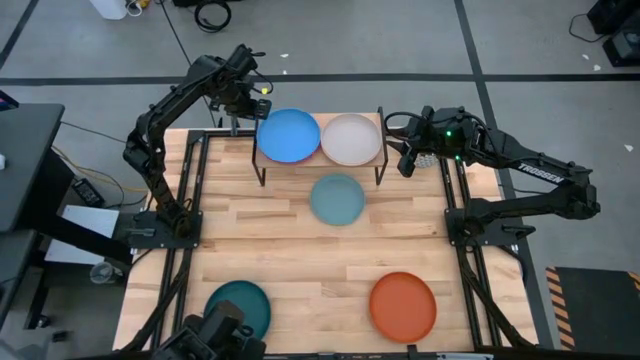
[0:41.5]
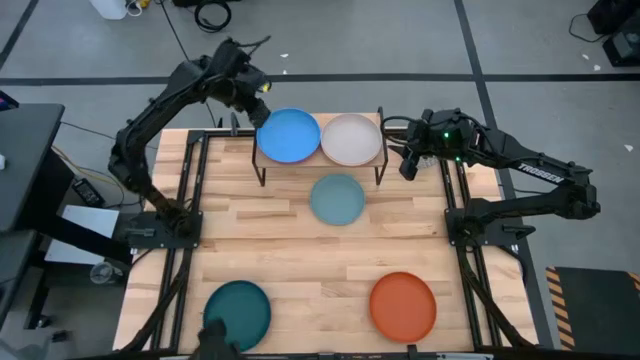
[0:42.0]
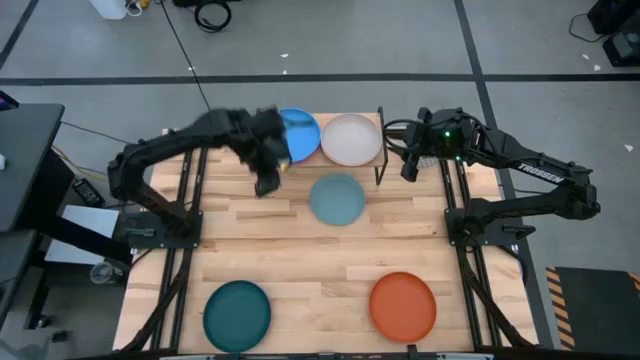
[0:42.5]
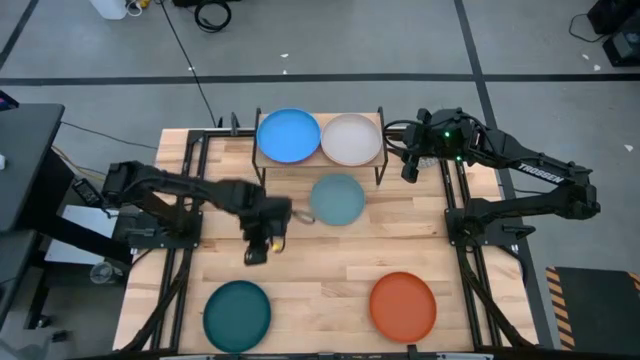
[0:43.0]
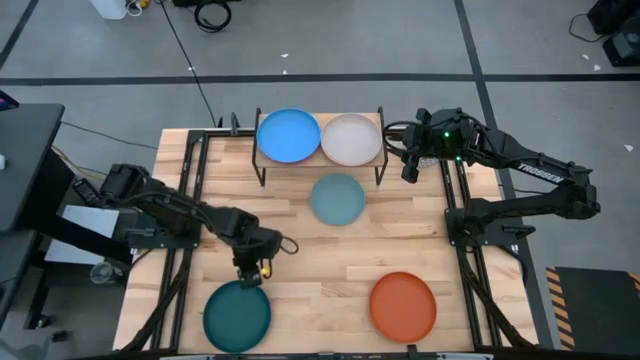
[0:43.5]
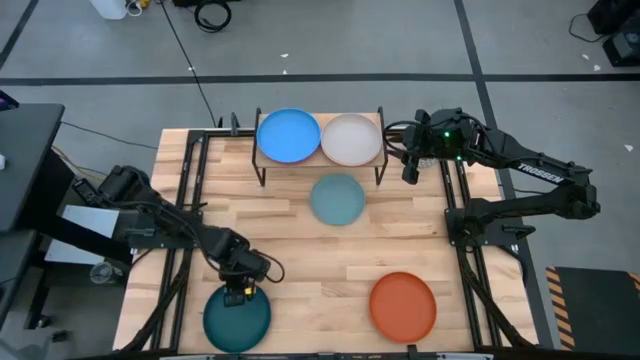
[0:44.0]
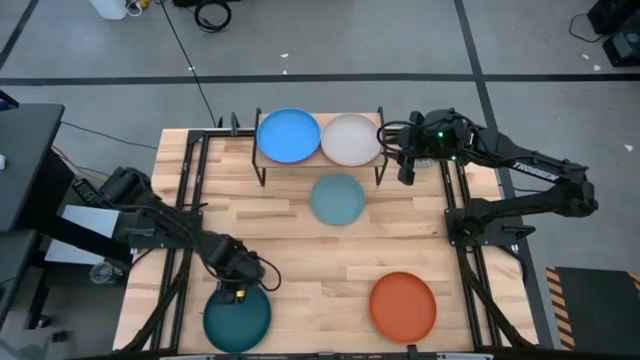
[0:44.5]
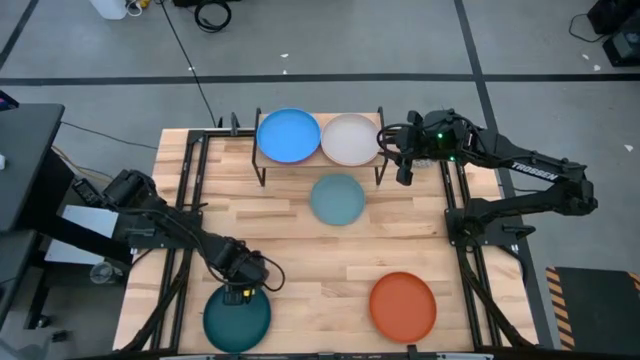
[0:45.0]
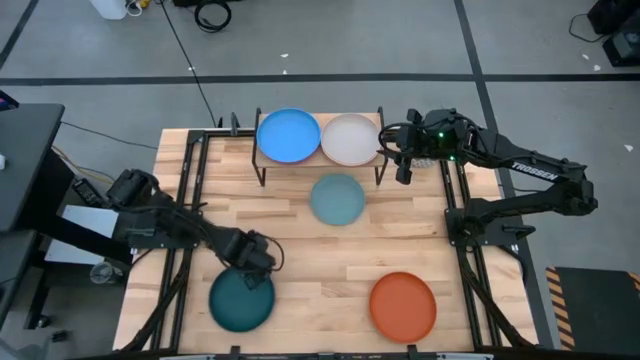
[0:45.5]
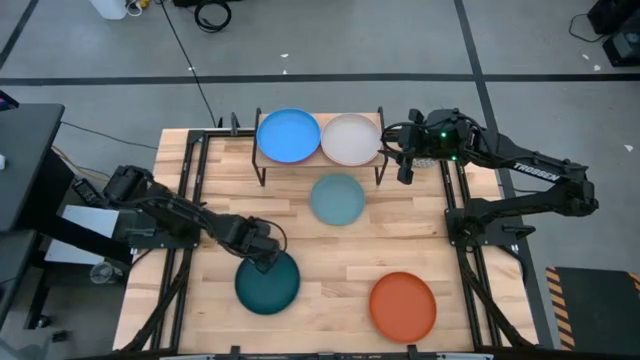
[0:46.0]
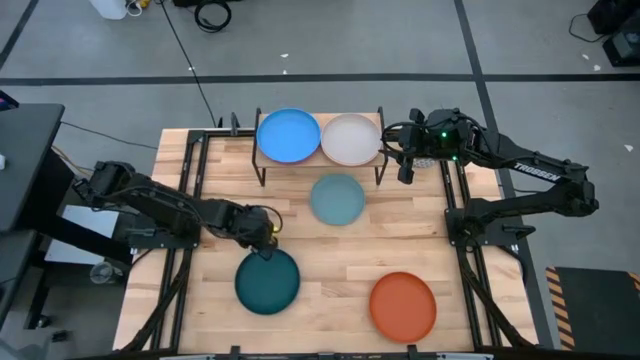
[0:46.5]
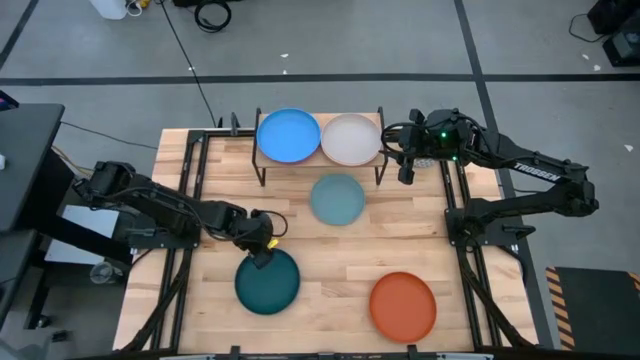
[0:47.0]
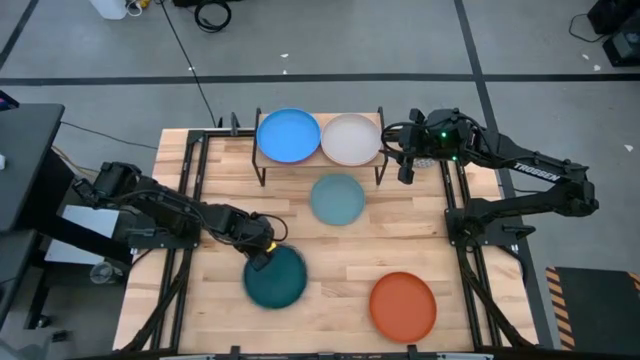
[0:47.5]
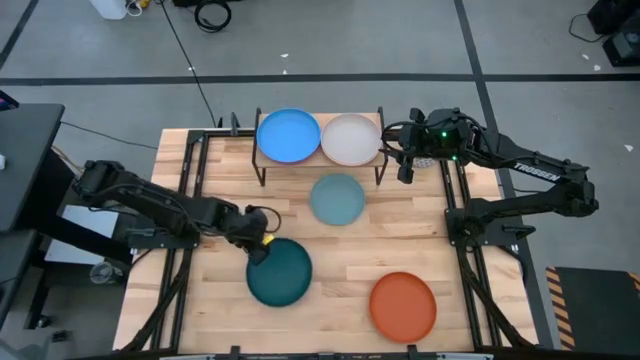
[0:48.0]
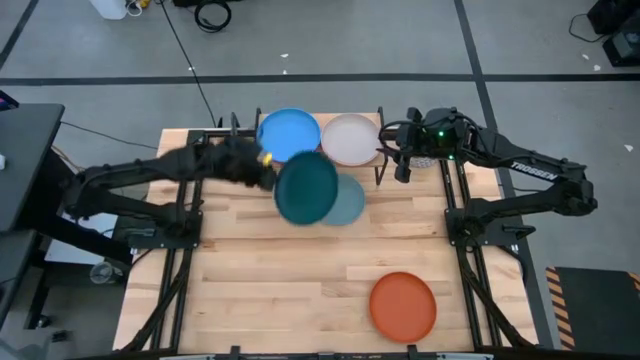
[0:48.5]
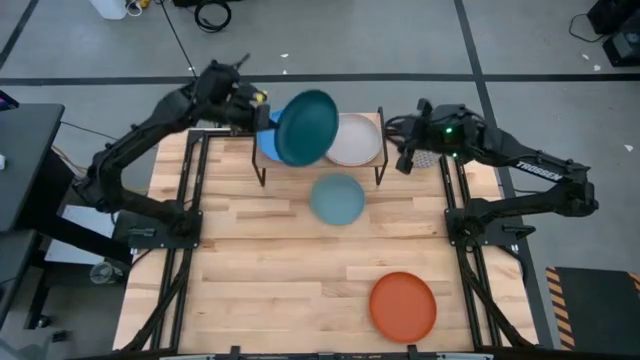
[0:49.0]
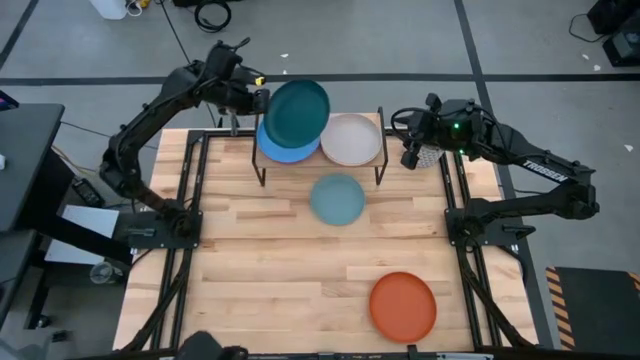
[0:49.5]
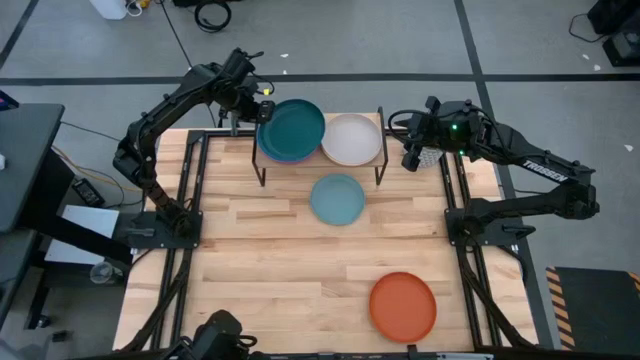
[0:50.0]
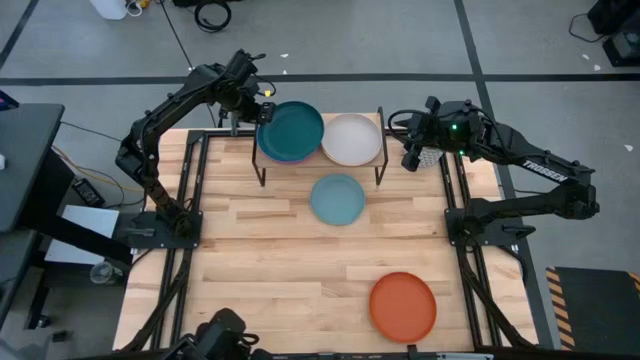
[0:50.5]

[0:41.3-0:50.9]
Task: Place and stack plates onto a shelf
Stack the dark blue plate on top of the blue plate on the shelf

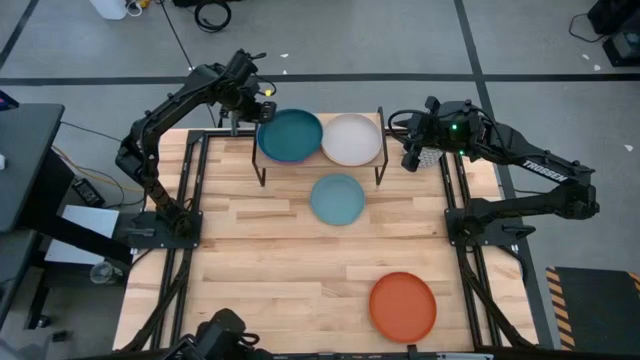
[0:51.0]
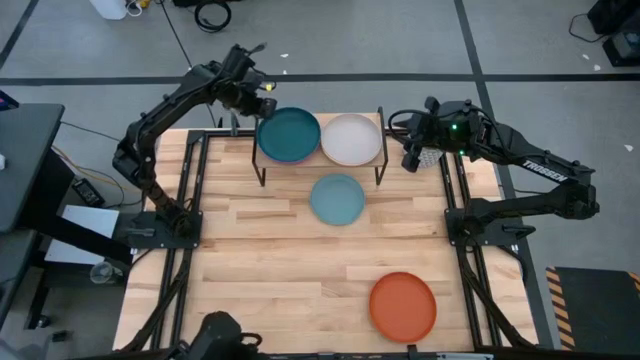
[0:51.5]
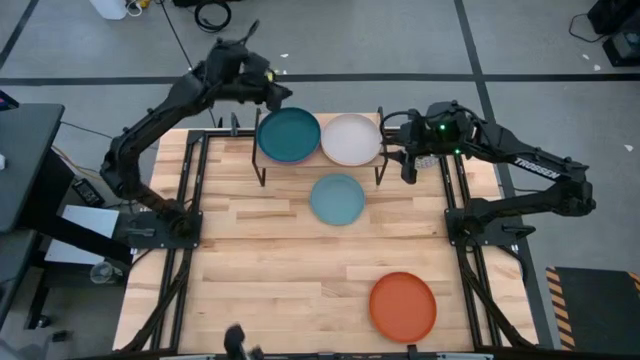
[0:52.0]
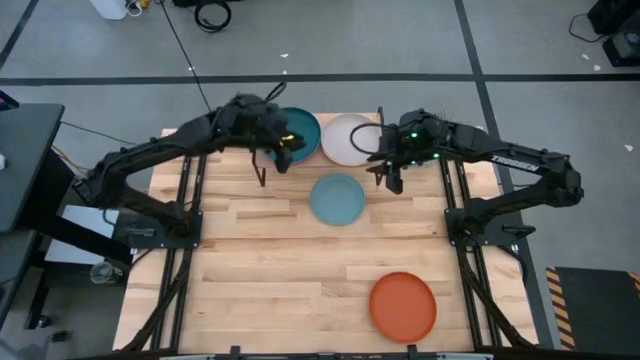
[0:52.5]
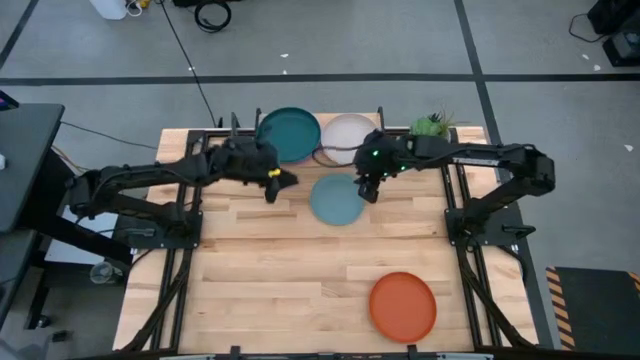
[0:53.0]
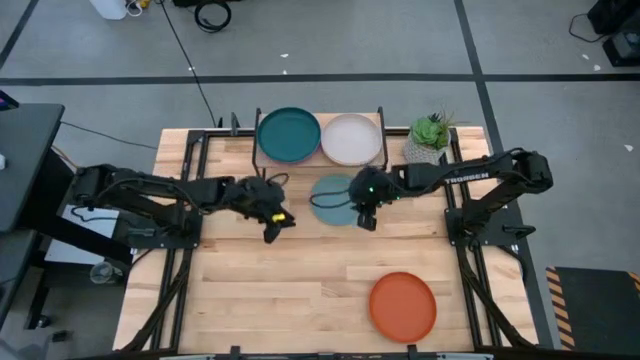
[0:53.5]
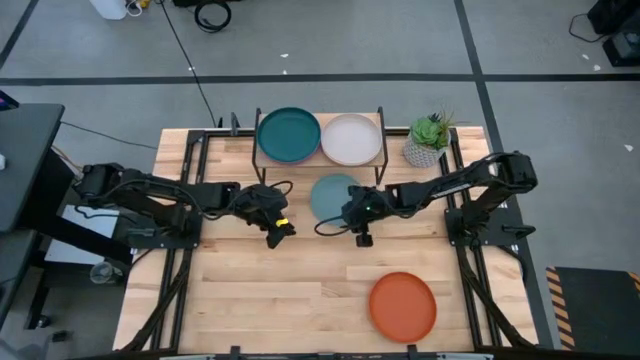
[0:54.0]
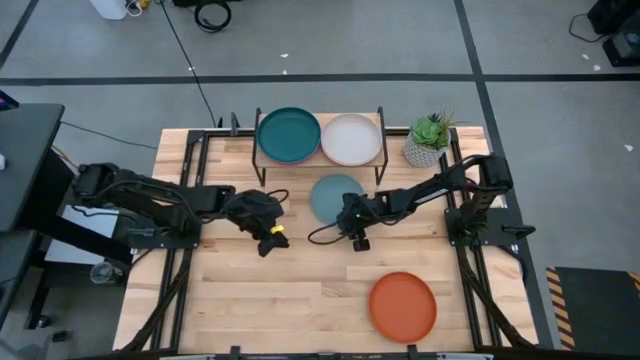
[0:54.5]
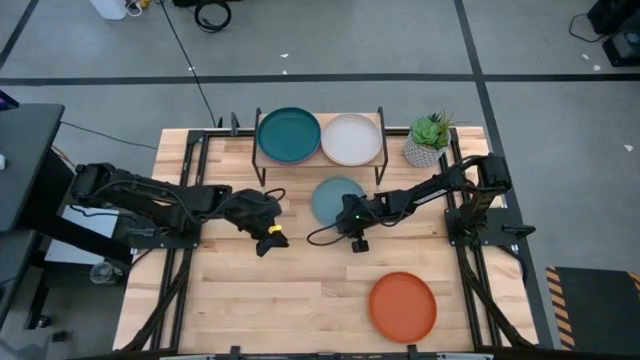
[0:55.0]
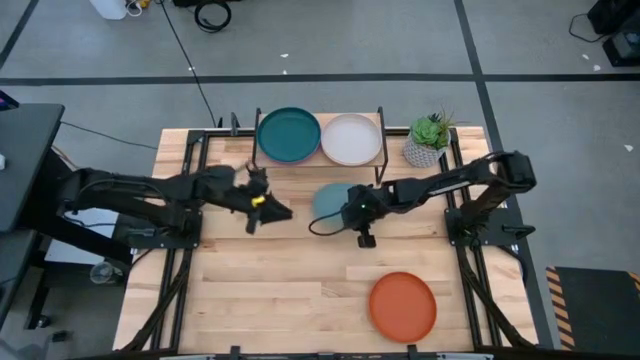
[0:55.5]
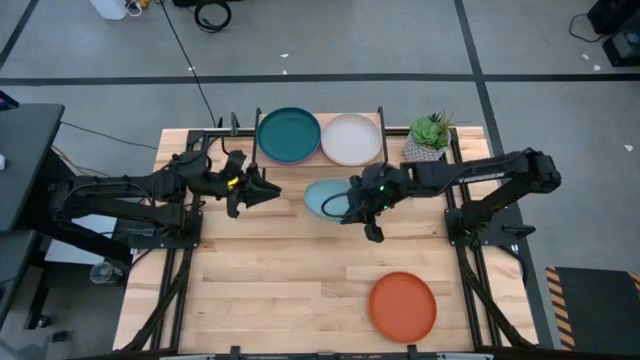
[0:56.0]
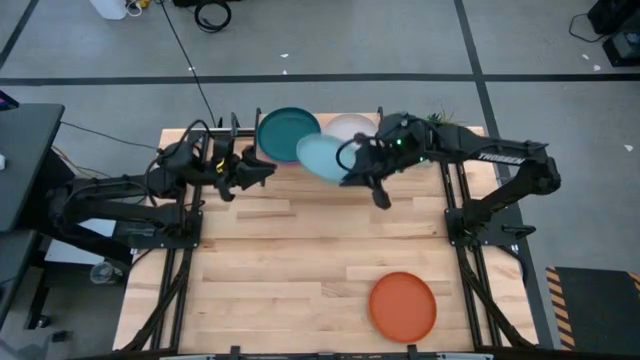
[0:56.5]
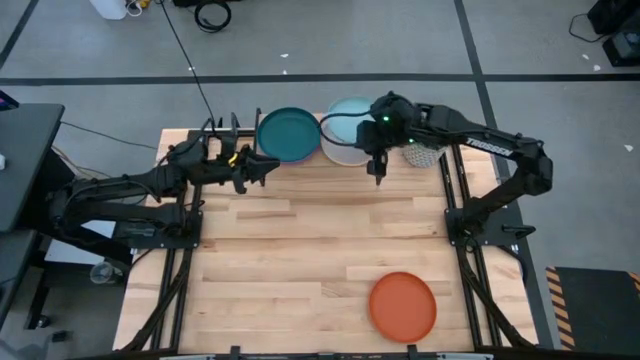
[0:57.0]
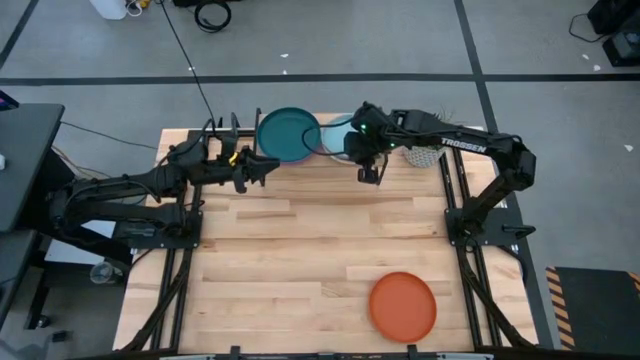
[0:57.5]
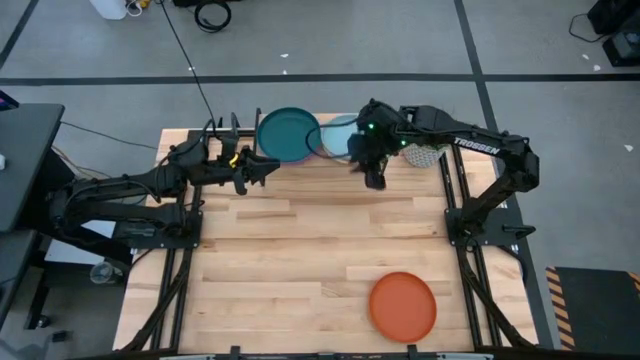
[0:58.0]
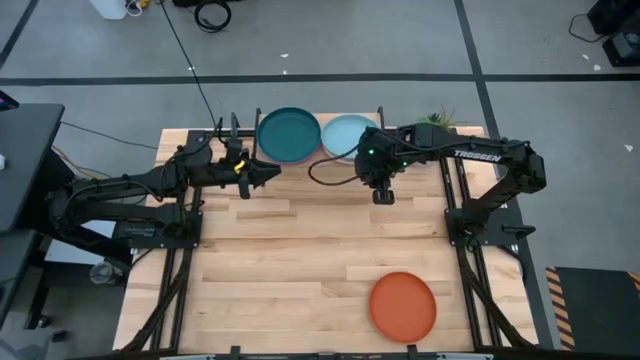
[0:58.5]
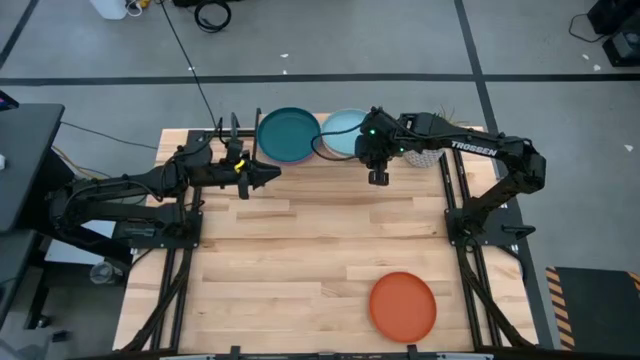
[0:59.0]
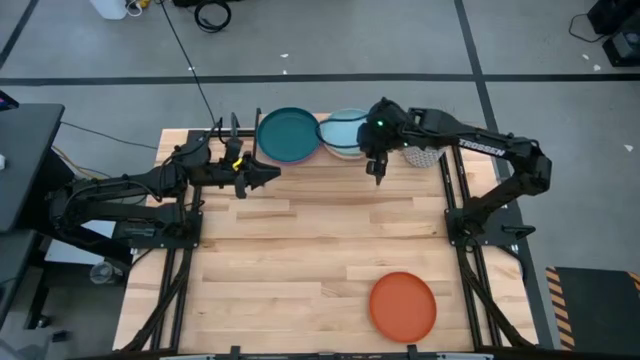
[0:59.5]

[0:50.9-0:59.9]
Stack the light blue plate on top of the gray plate on the shelf

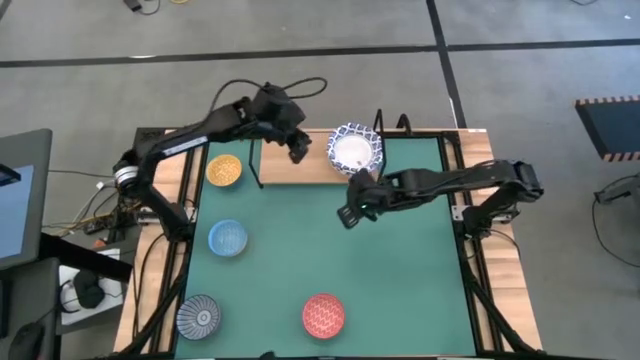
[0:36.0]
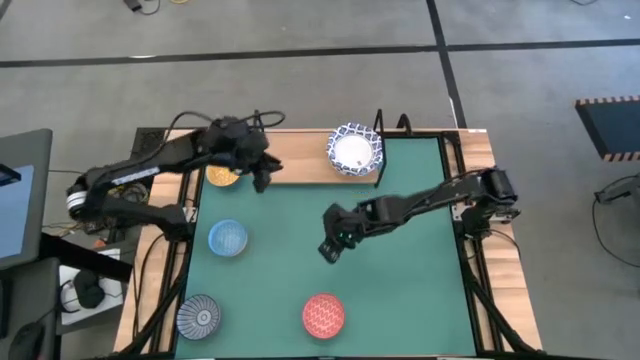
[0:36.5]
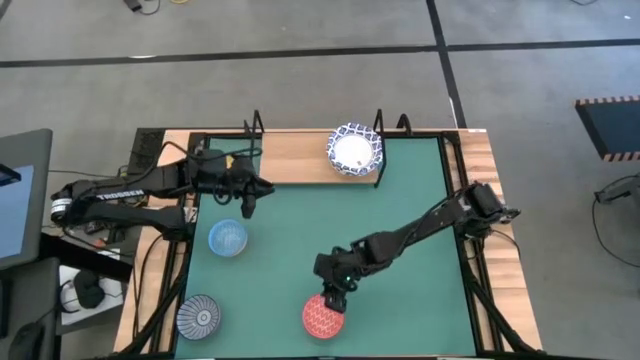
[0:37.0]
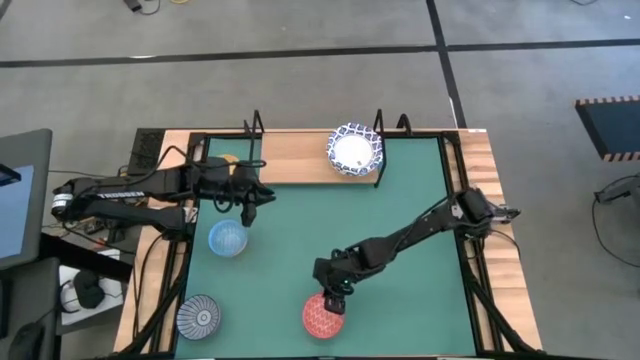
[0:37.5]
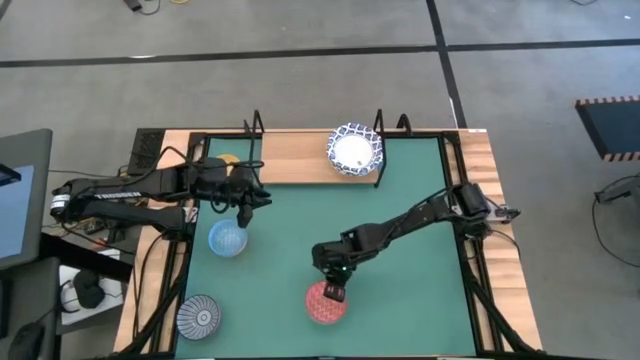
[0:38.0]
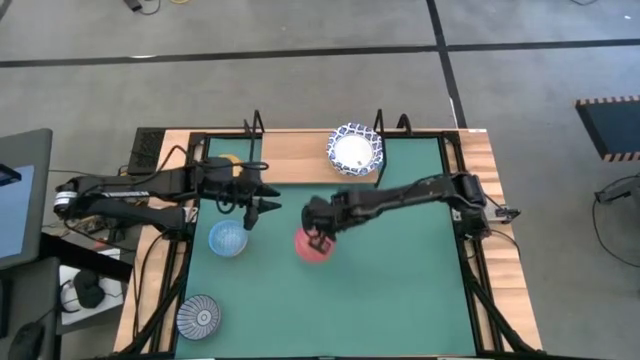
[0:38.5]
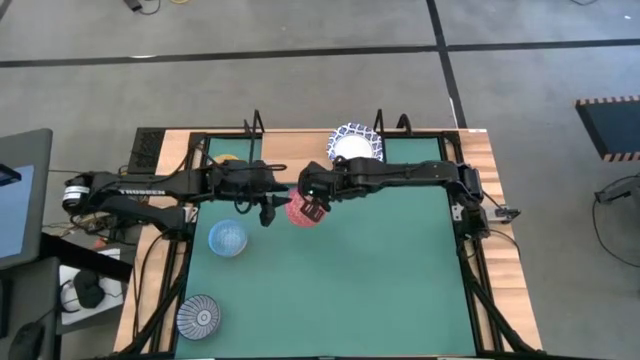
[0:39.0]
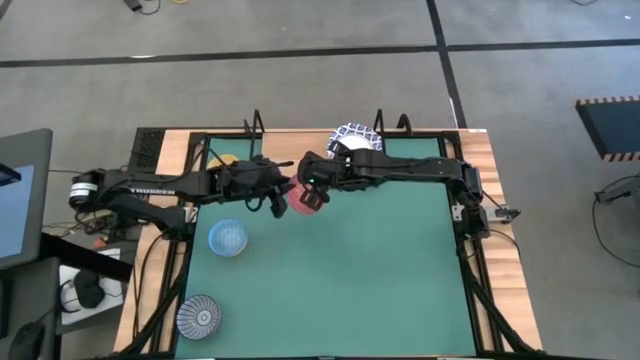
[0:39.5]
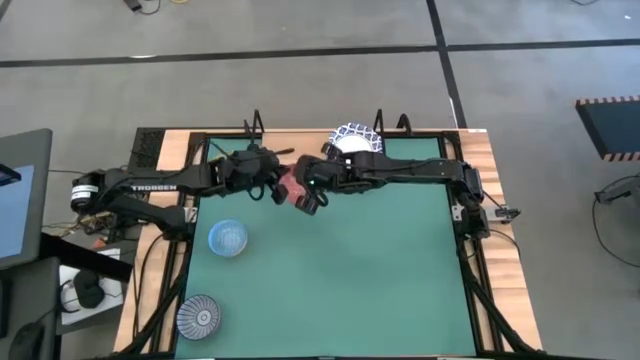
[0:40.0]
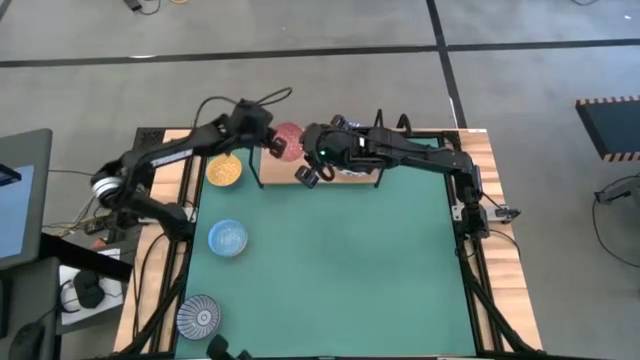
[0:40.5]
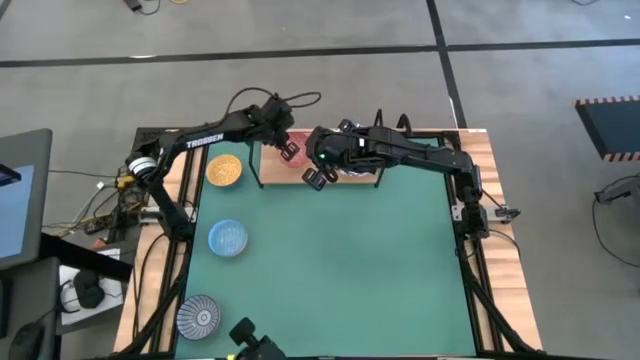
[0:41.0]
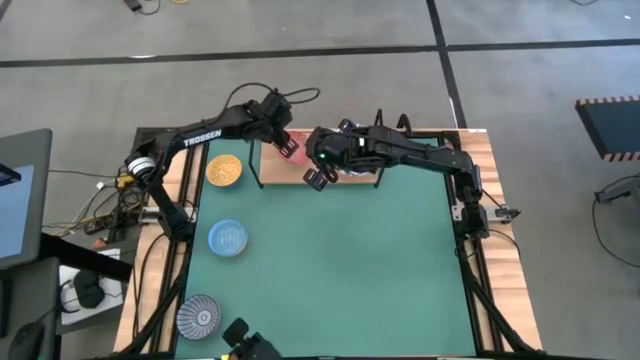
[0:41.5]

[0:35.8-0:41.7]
Task: Place and stack bowls onto a shelf
Put the red bowl on the shelf
